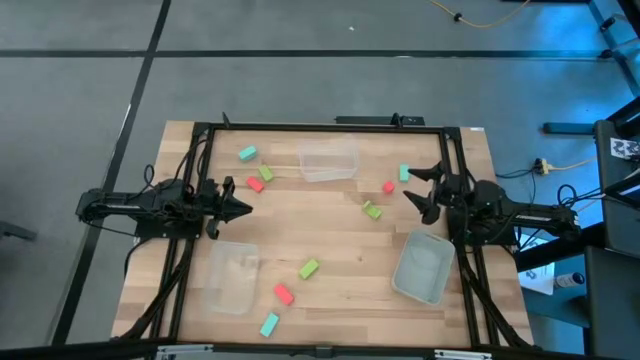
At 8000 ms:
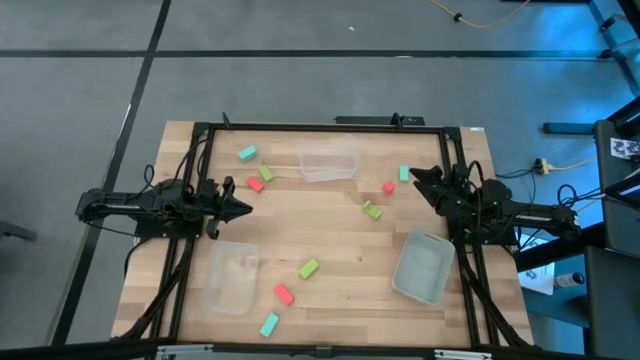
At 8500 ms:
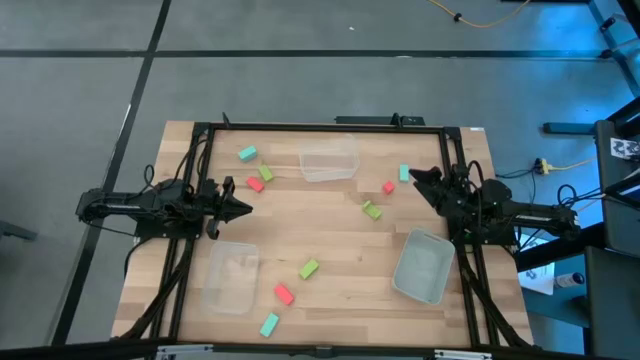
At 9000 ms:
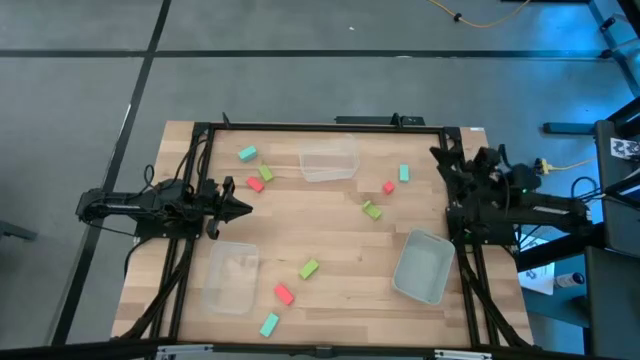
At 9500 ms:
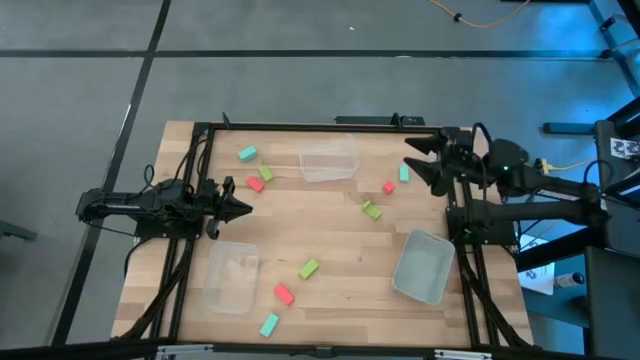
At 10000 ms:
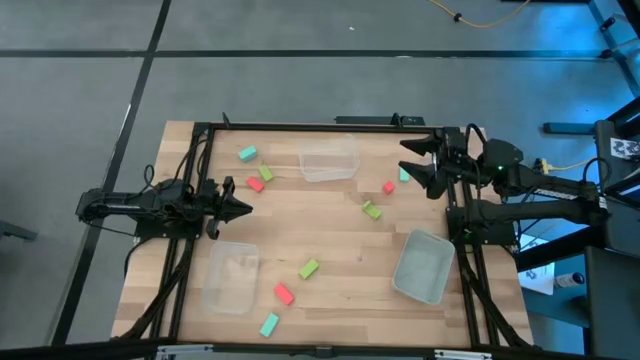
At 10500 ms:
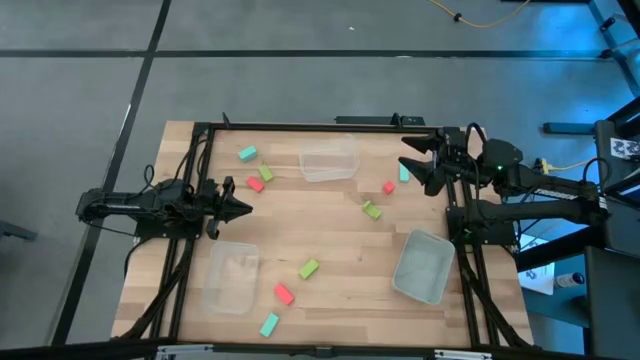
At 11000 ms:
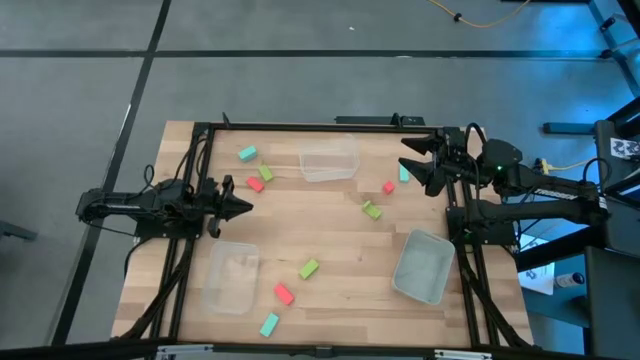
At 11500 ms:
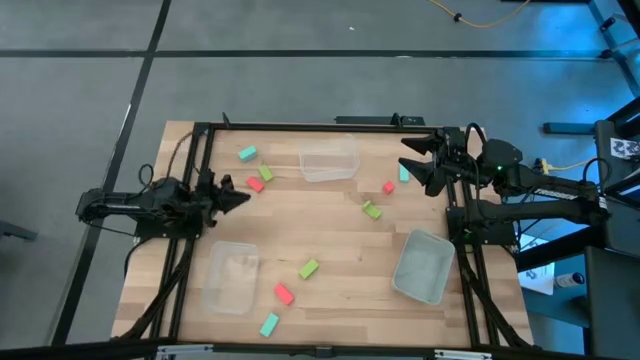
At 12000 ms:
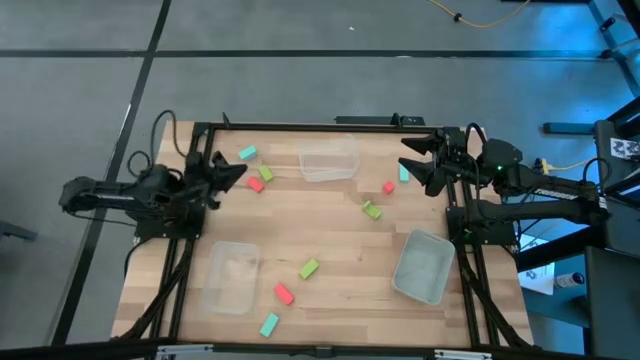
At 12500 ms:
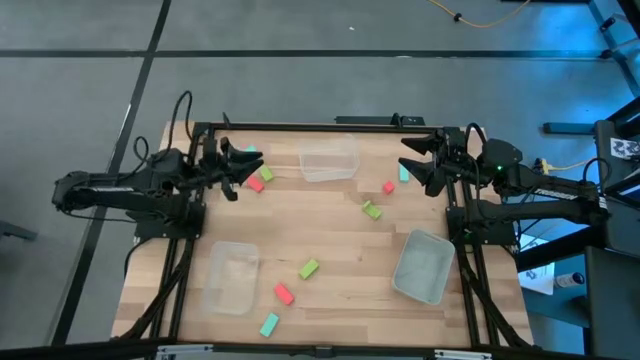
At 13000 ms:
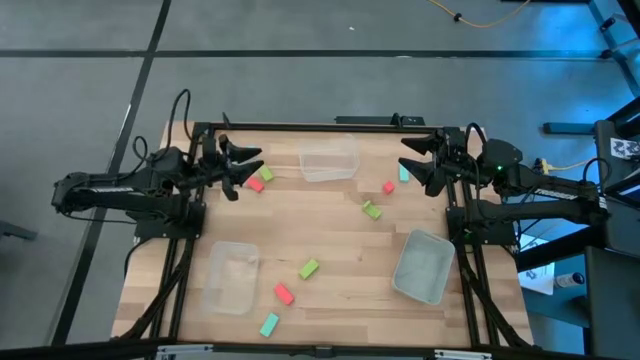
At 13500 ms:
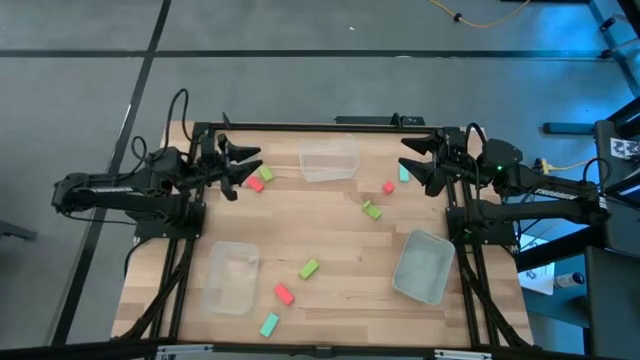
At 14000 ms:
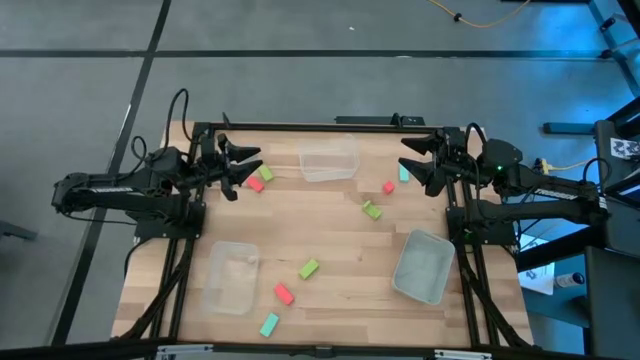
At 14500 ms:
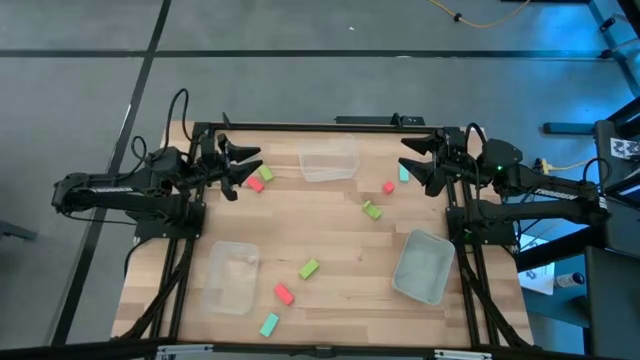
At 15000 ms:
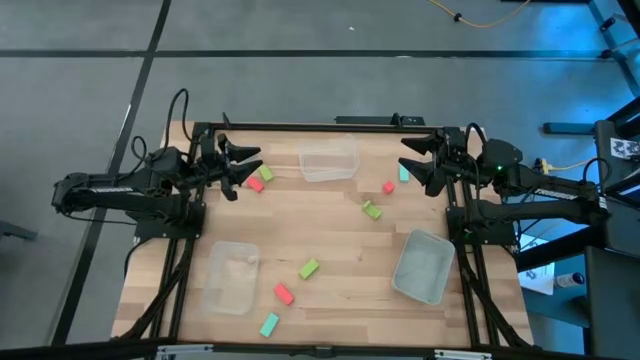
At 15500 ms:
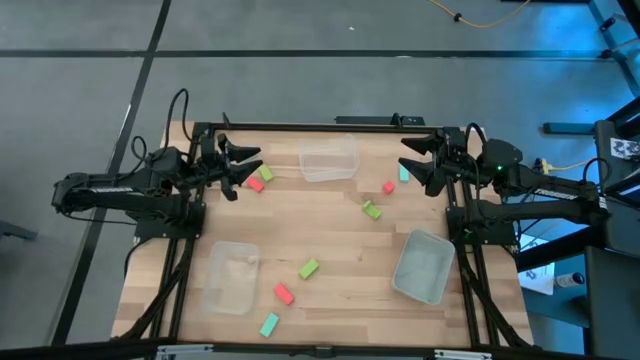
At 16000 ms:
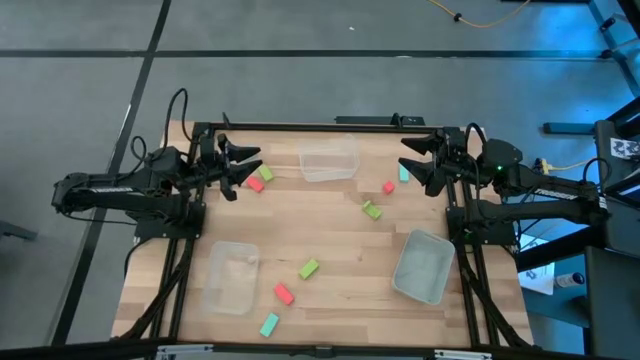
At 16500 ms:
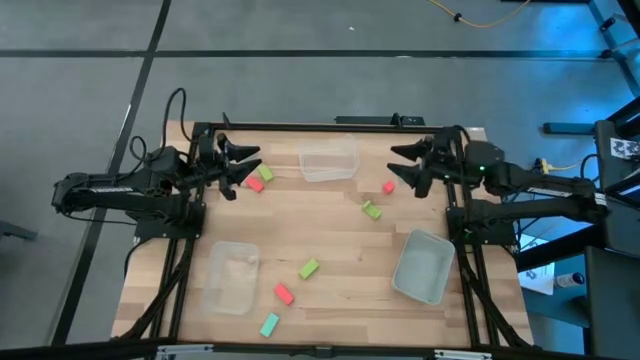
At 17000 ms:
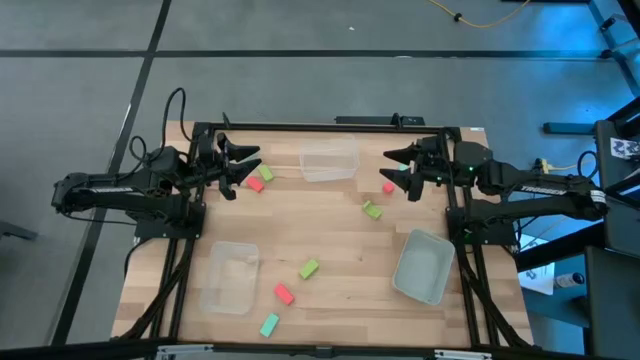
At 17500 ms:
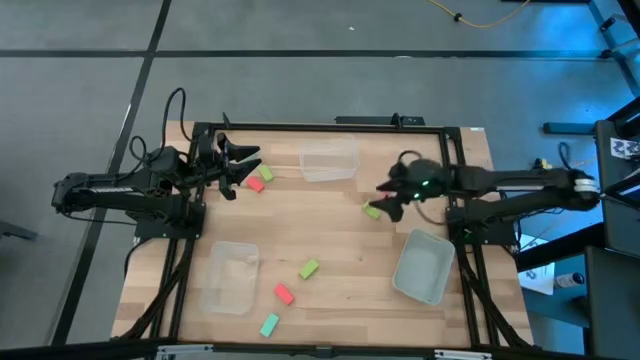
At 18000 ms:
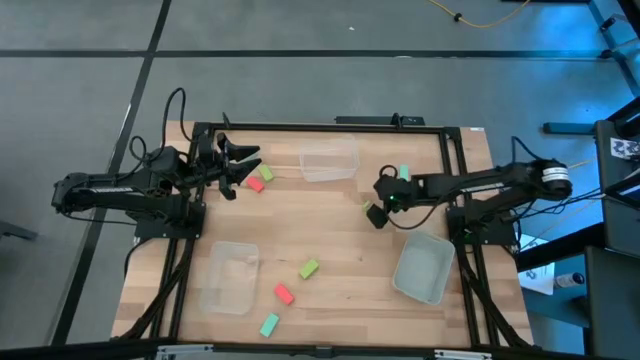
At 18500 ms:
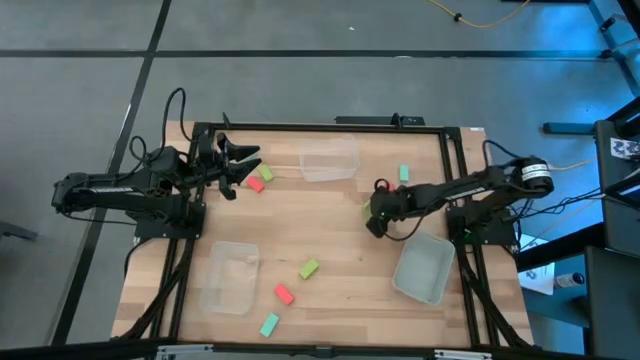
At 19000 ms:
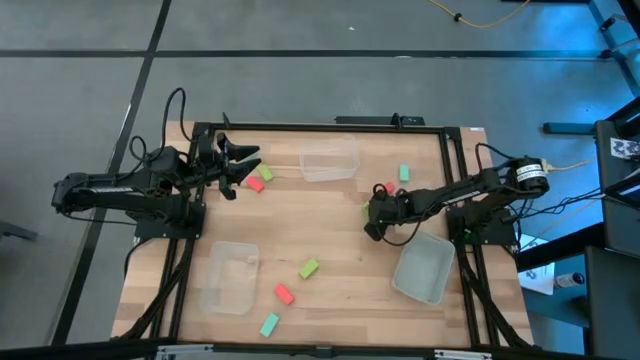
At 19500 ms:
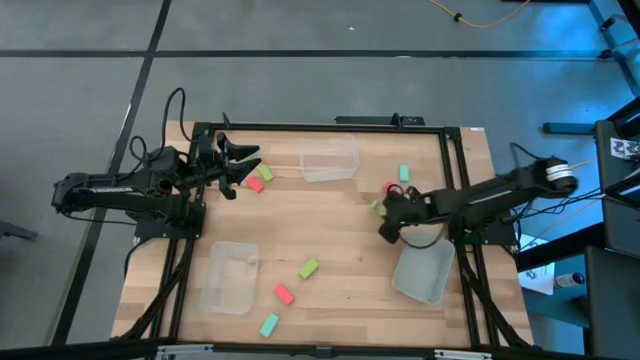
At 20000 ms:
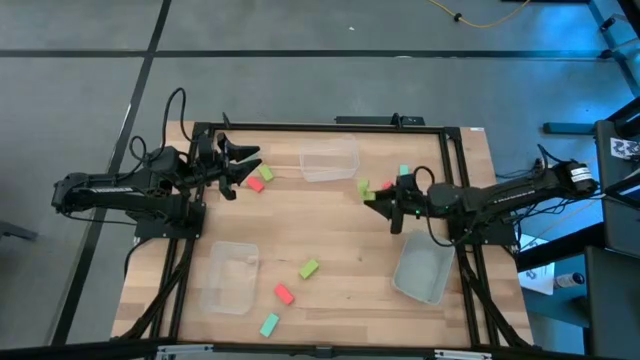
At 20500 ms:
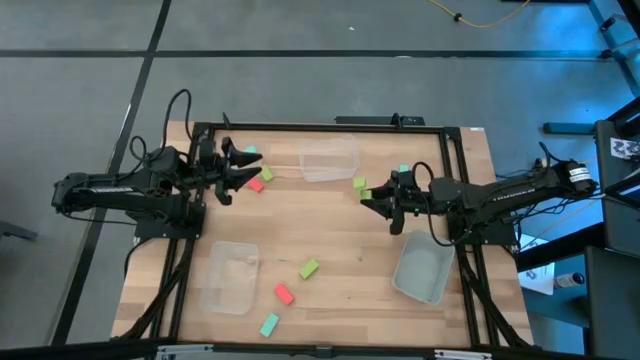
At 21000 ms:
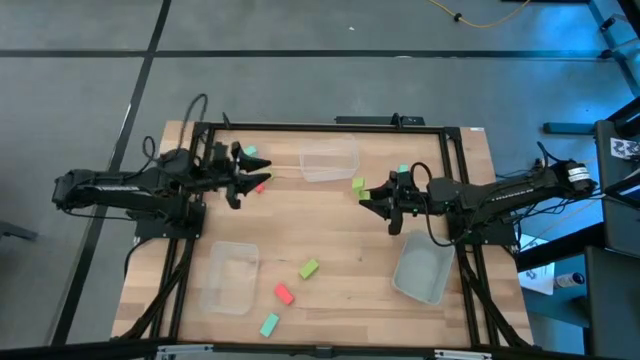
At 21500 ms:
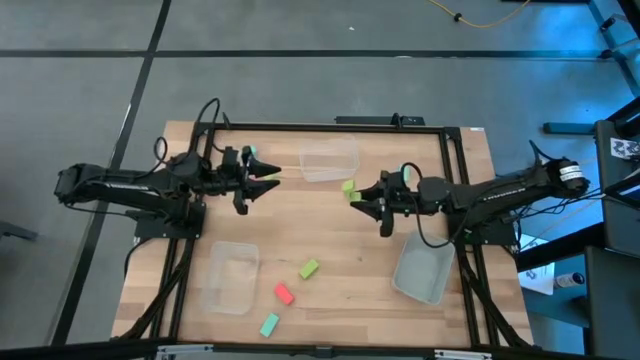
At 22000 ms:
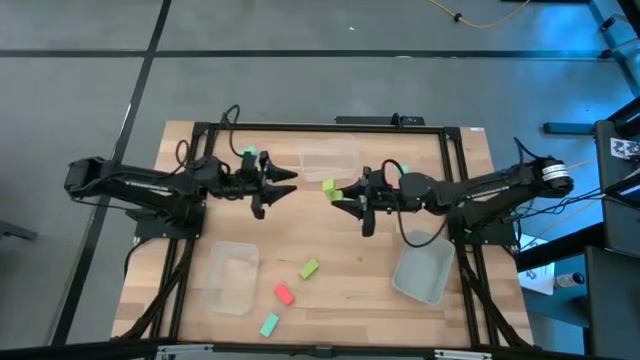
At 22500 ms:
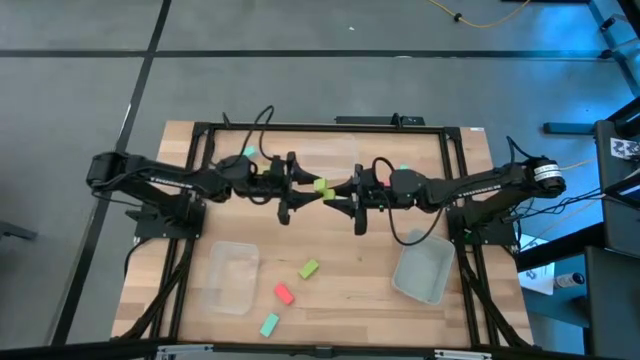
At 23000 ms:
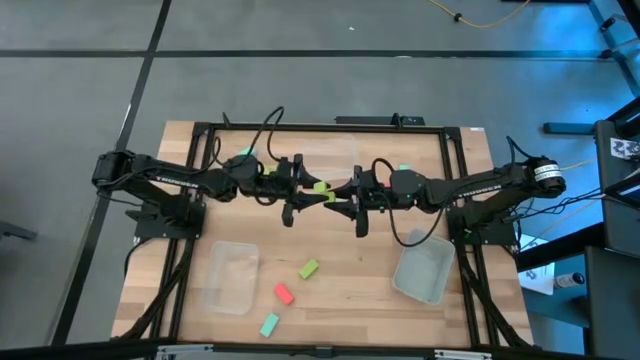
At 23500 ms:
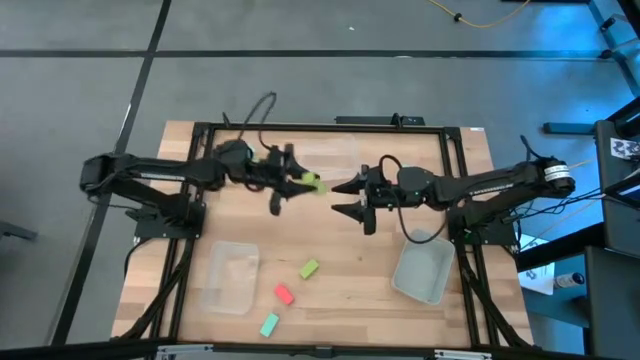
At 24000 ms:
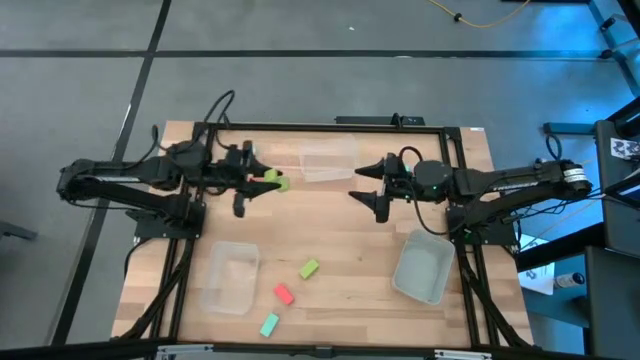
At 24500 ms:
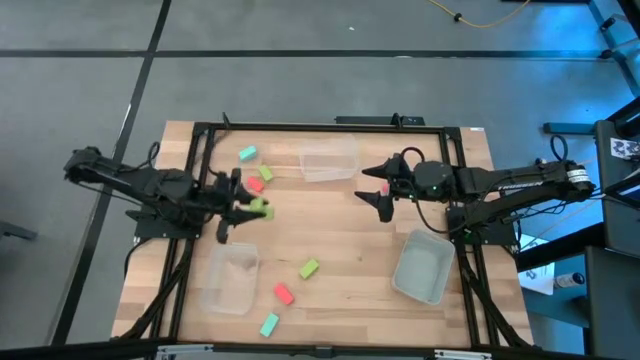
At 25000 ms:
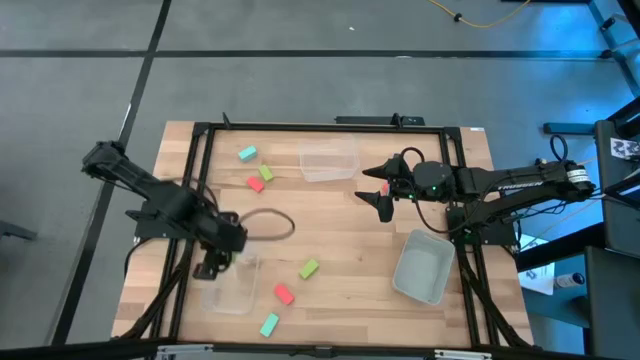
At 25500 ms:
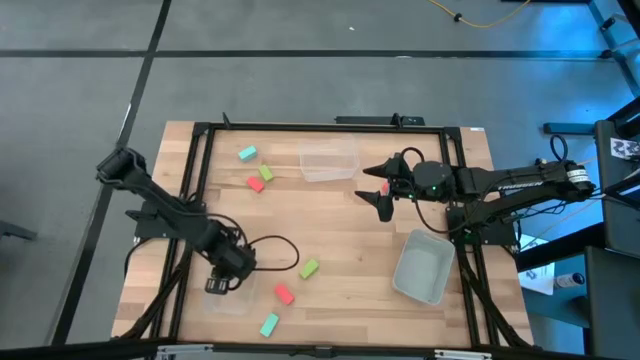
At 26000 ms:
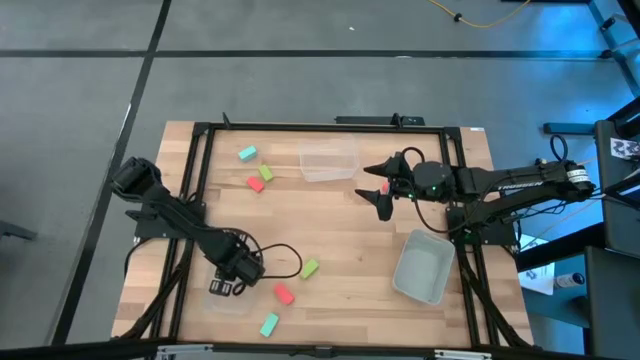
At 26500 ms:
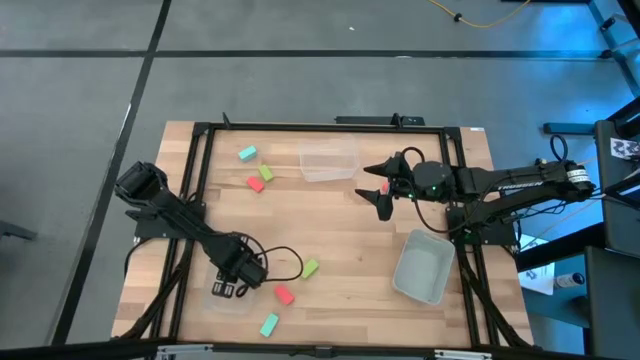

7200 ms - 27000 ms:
Task: Sort & place blocks by color
Put the top right green block into the bottom left transparent bin
